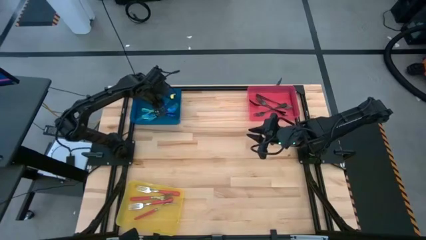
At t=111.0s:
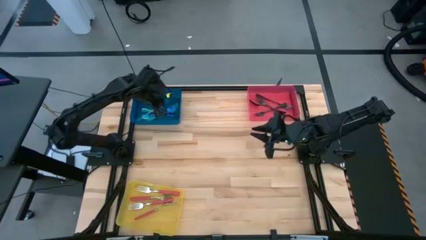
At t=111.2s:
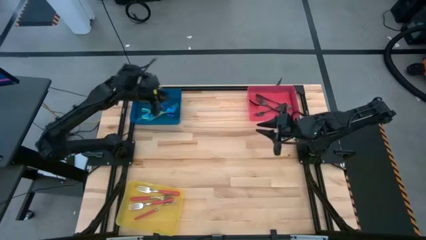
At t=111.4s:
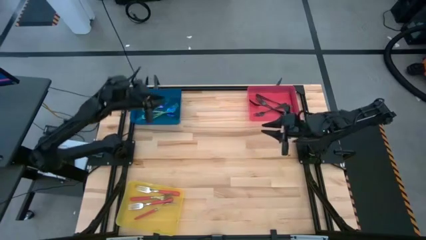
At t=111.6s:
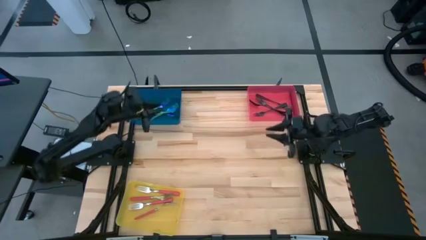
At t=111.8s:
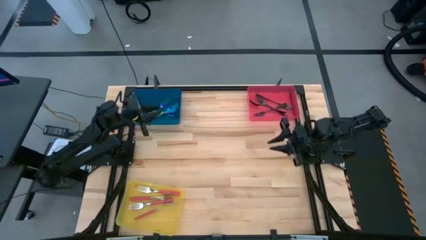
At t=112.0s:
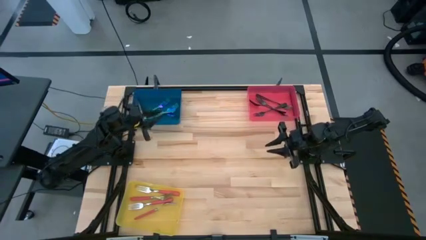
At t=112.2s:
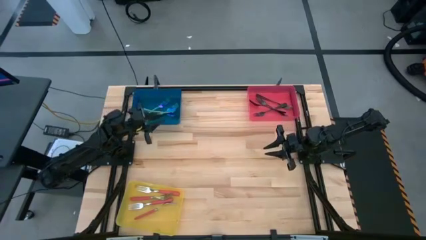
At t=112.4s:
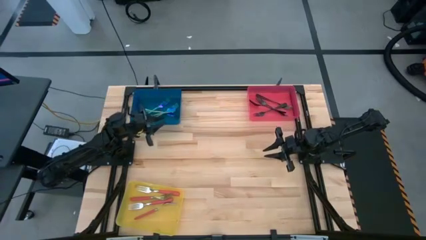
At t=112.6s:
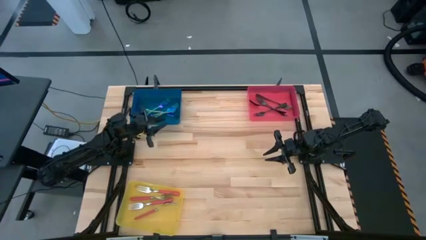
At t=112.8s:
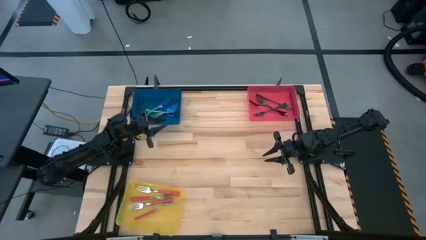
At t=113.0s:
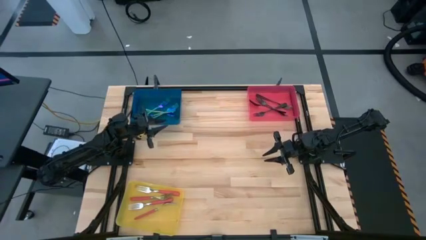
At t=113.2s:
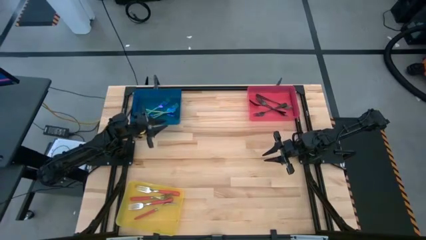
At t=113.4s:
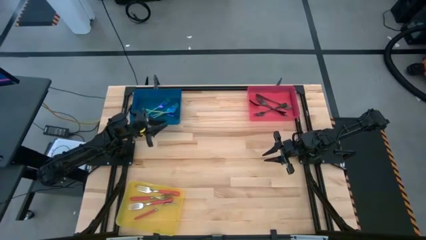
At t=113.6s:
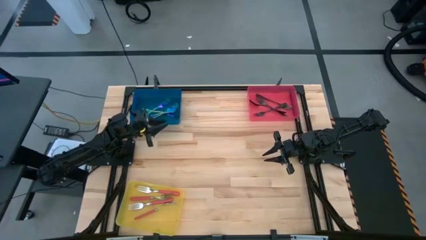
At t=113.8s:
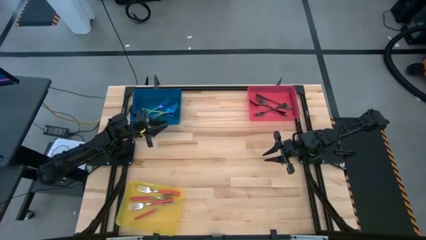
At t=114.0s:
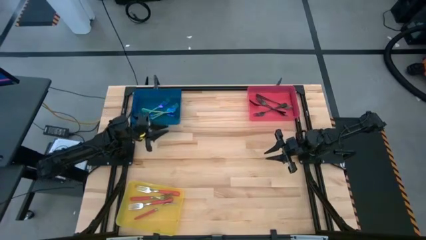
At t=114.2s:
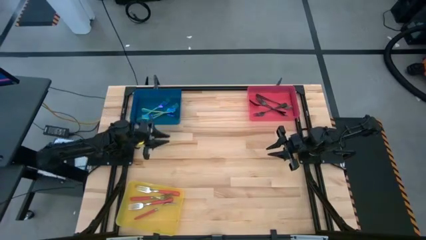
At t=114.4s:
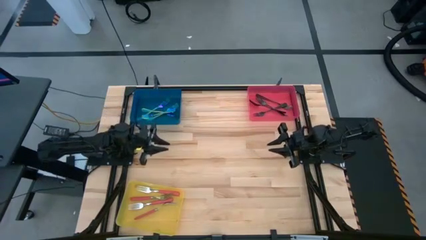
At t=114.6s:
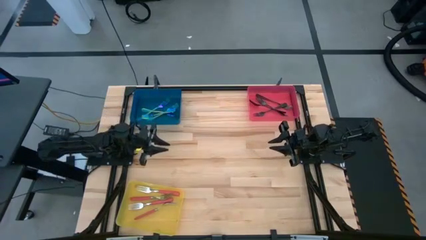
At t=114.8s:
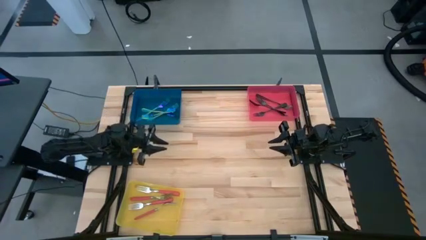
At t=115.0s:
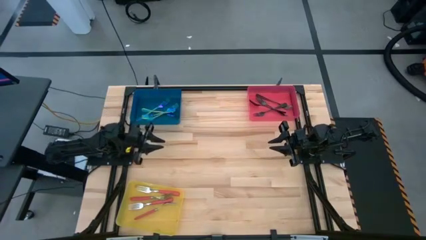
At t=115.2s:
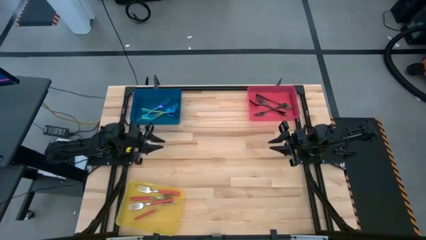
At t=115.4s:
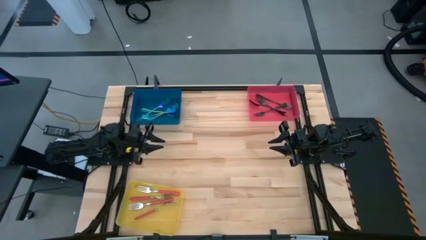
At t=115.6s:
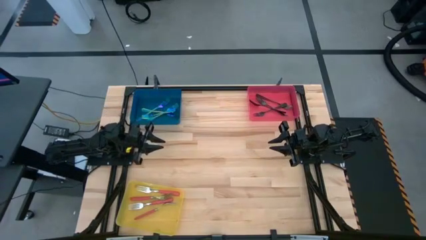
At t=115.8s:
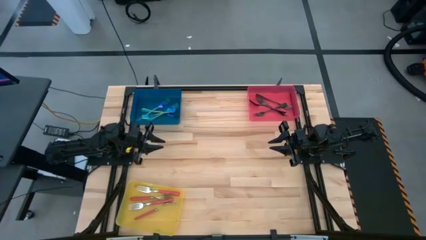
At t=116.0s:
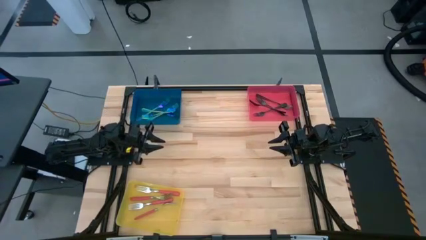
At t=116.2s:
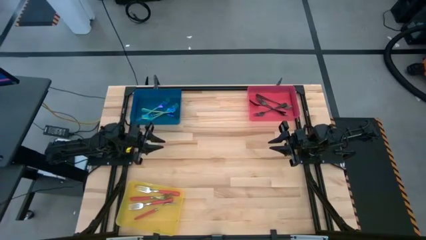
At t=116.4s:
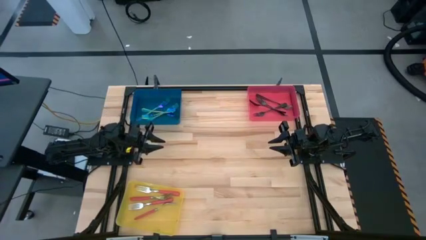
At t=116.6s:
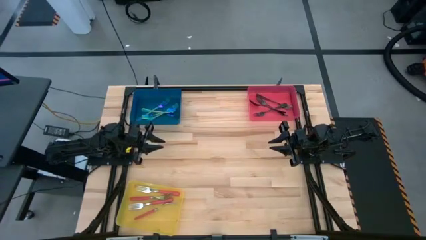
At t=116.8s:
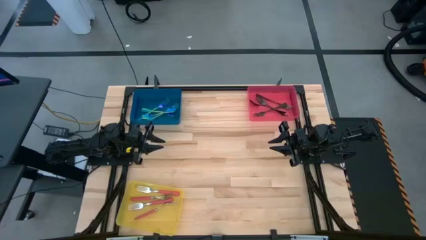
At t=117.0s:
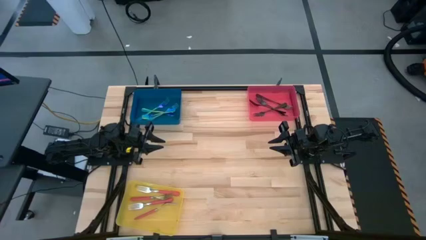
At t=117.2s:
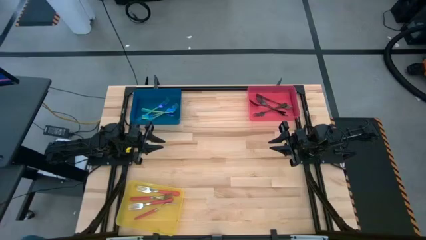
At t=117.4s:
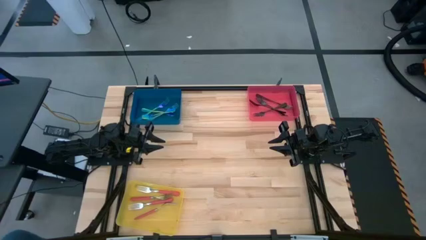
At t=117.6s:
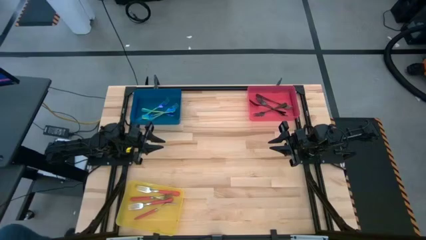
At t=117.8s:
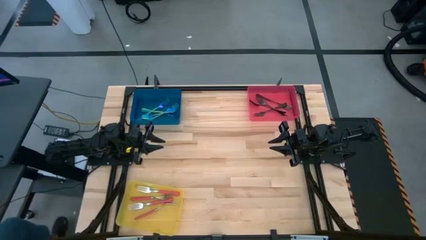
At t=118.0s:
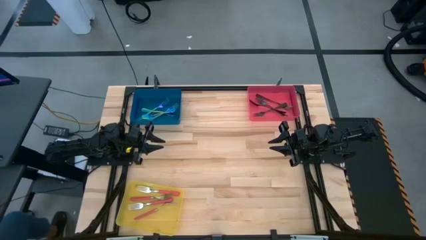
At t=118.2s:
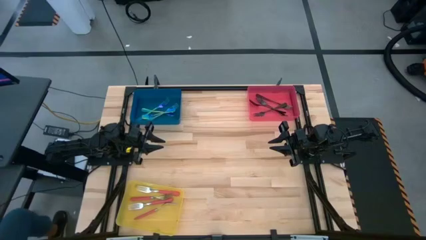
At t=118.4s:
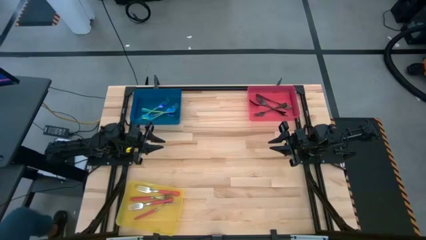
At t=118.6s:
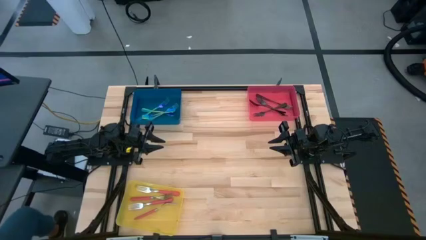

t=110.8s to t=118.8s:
Task: Sort silverware by color (type)
Return to Home Position

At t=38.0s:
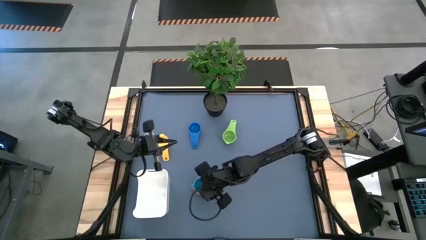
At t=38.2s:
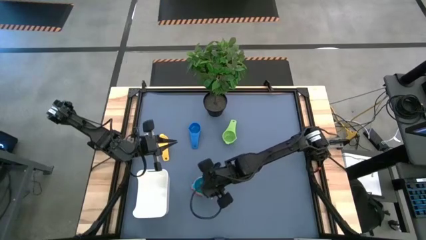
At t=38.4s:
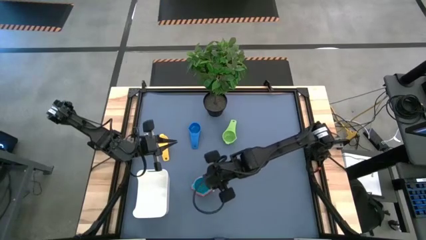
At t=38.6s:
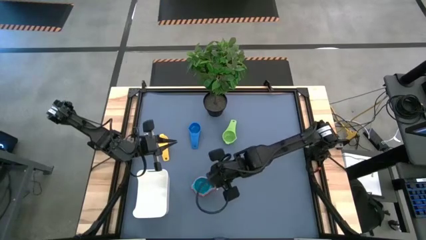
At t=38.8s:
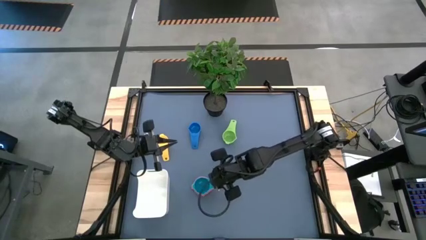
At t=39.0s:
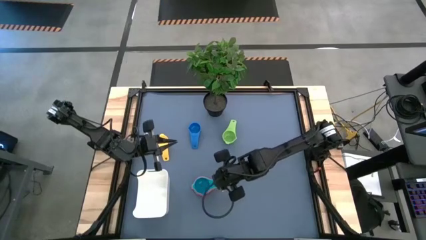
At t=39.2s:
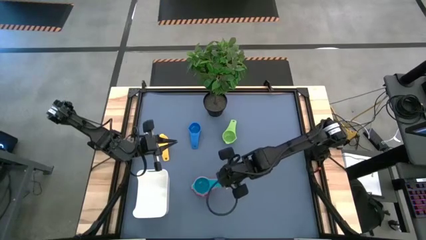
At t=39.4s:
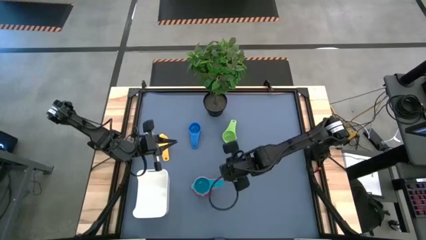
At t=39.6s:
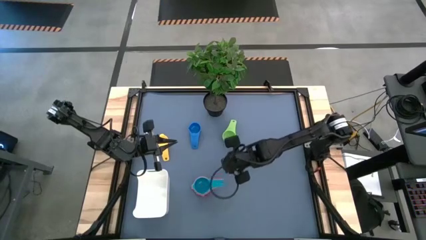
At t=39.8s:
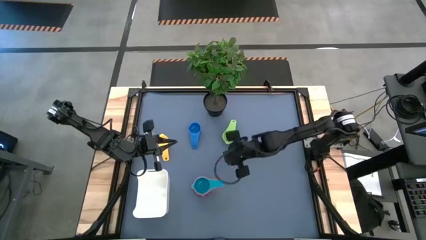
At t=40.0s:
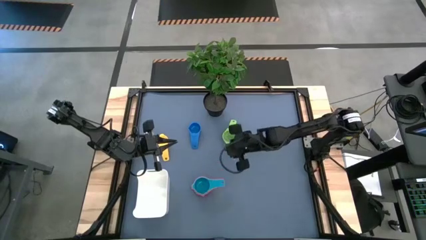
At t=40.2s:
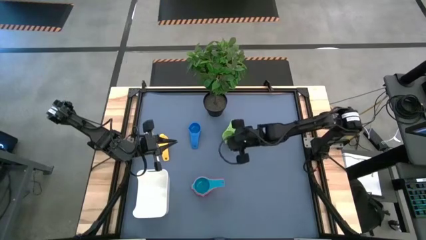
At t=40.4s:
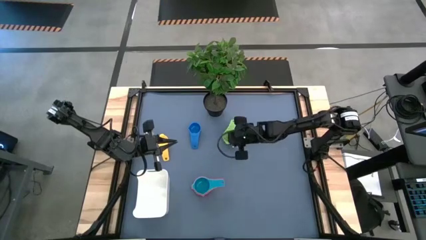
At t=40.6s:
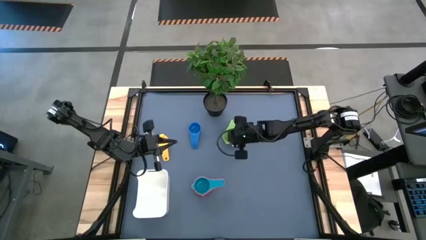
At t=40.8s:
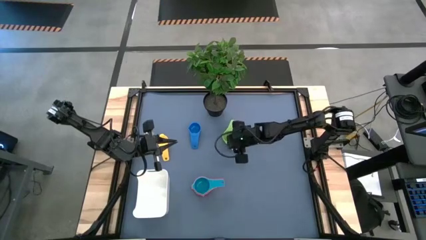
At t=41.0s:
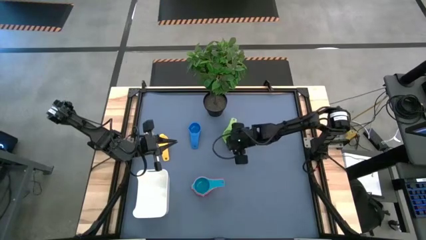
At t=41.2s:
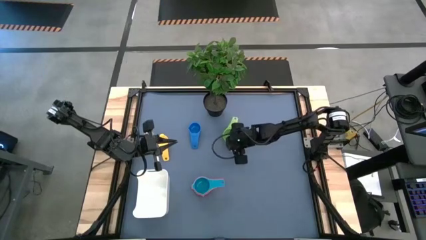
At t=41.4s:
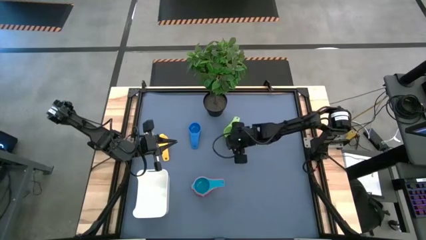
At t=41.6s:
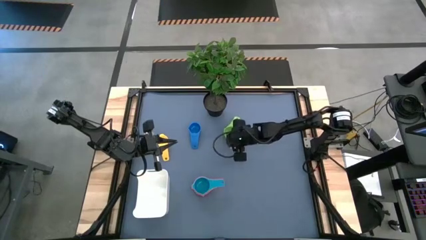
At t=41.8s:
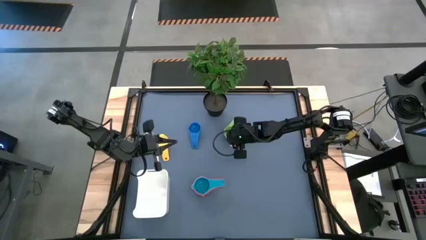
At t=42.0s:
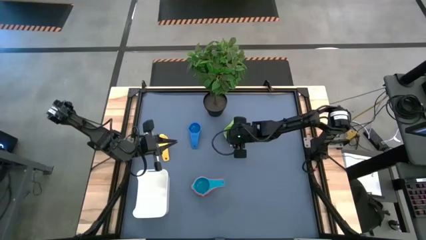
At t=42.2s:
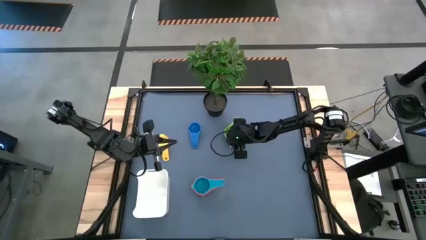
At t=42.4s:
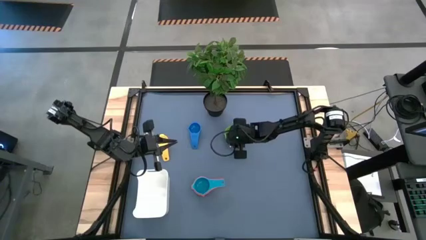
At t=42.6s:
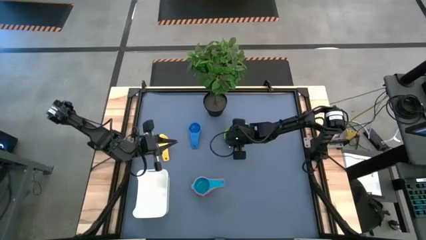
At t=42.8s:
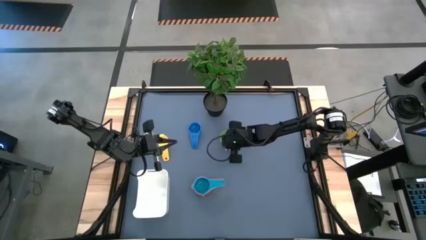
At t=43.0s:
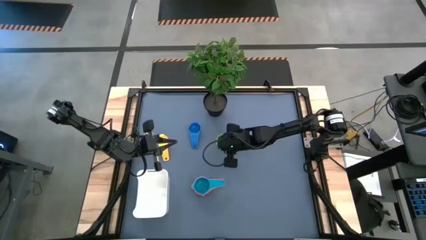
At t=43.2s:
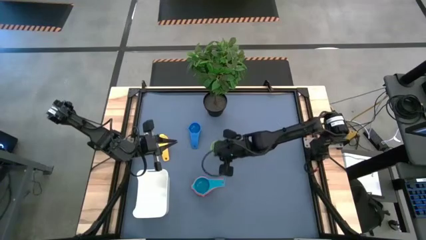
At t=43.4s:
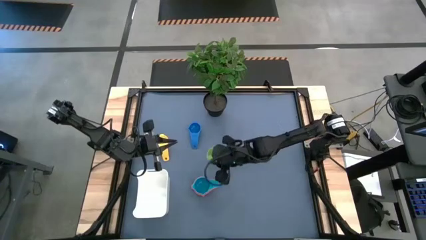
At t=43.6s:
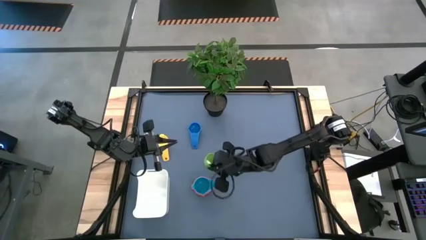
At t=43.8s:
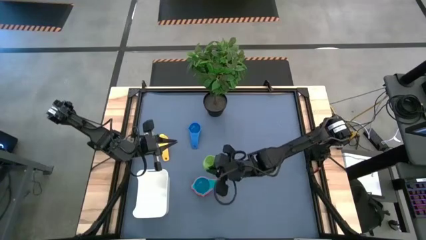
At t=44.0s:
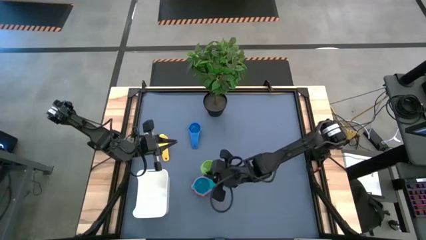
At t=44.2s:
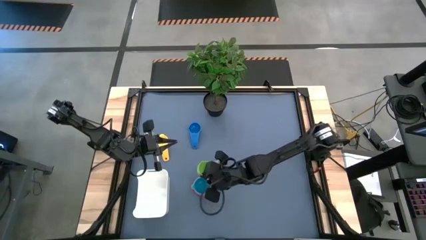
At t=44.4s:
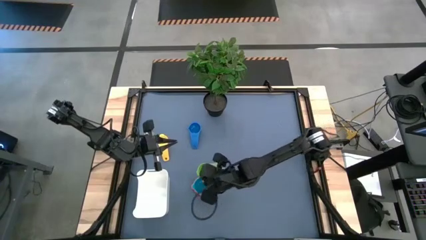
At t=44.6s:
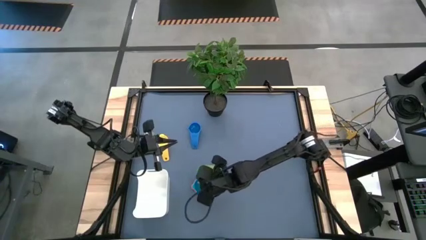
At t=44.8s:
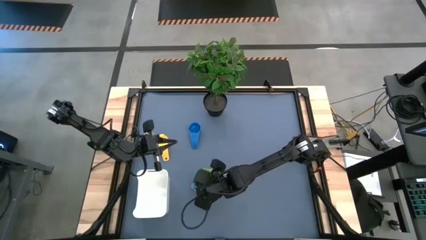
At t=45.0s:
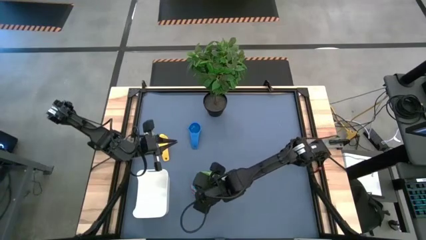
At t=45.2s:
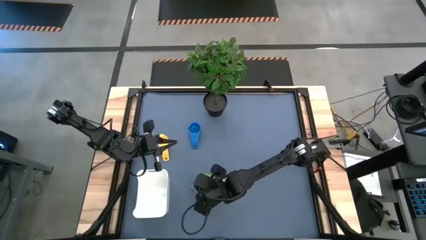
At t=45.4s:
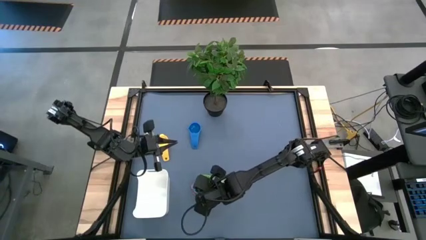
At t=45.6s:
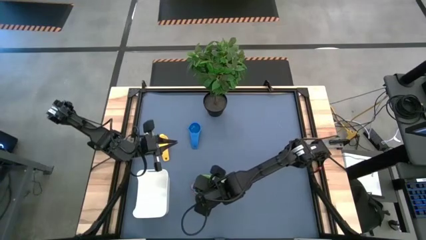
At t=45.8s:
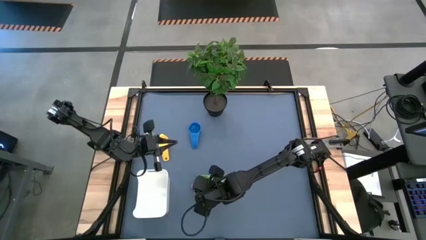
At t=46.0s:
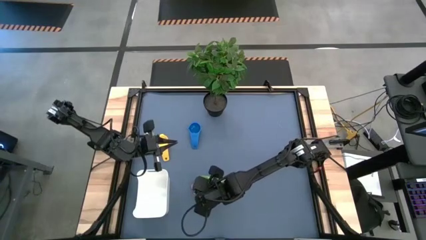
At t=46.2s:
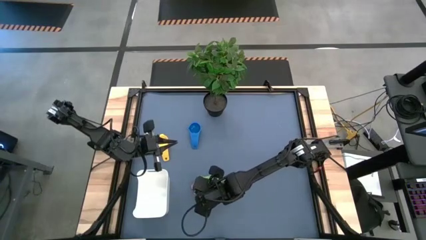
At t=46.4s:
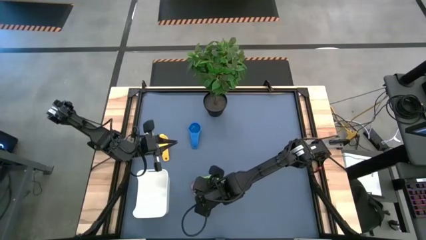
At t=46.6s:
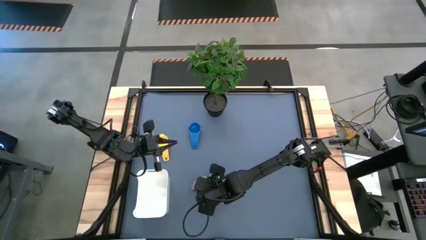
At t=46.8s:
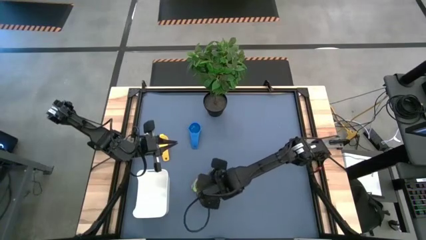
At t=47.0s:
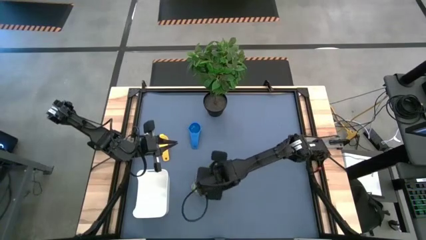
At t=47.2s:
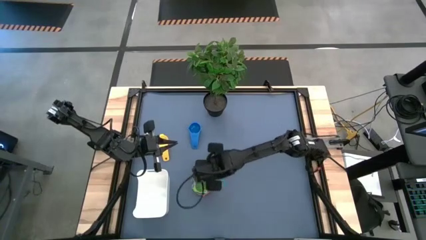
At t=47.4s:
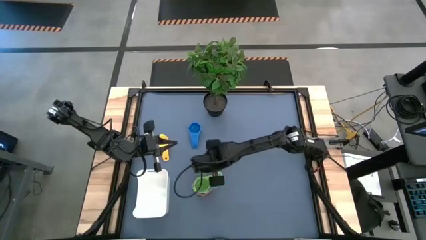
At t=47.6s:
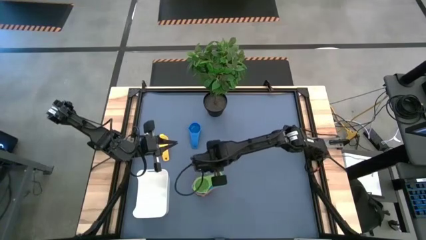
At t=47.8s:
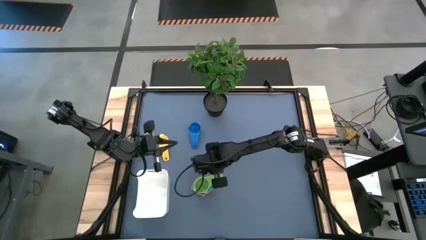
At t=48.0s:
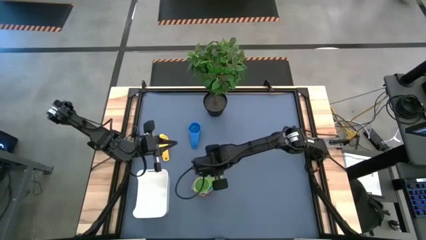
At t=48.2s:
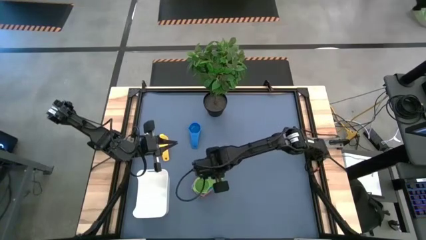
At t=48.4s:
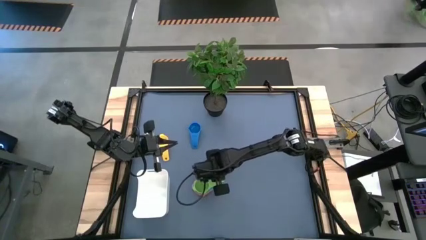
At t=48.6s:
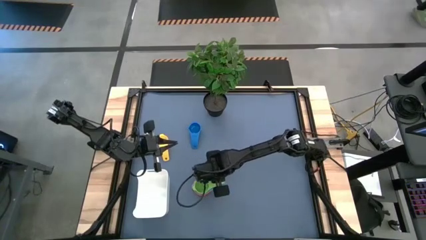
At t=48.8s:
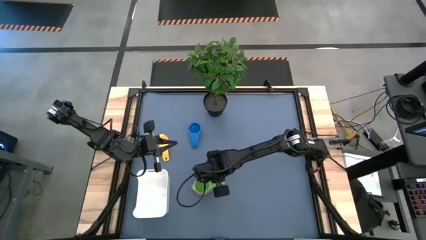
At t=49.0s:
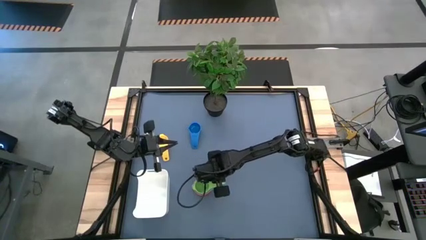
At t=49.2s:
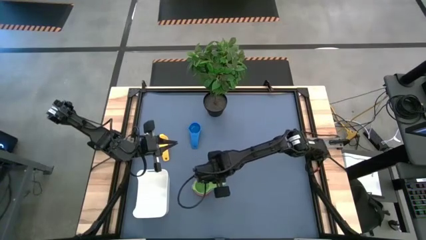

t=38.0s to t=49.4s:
Task: Nest measuring cups in basket
Stack the light green measuring cup on the light blue measuring cup
